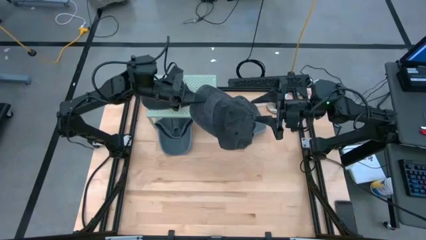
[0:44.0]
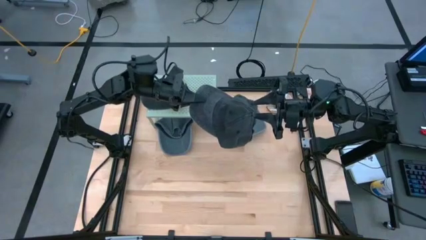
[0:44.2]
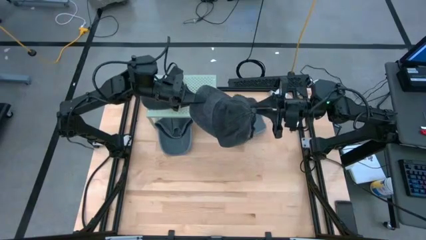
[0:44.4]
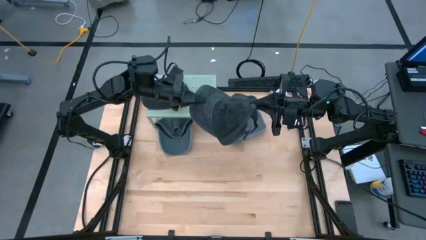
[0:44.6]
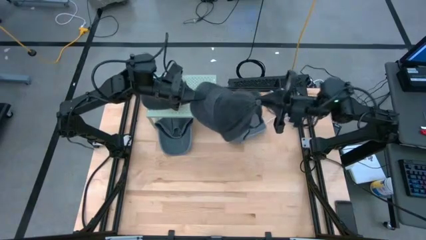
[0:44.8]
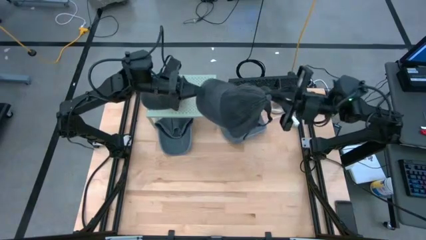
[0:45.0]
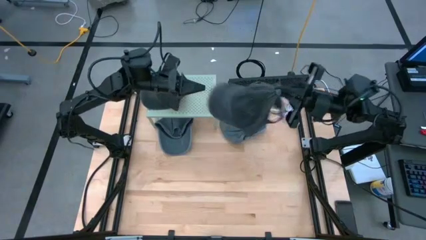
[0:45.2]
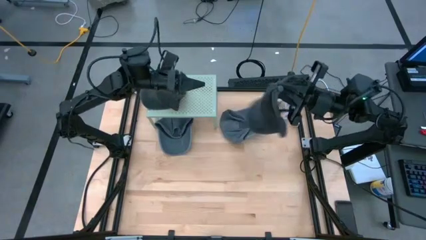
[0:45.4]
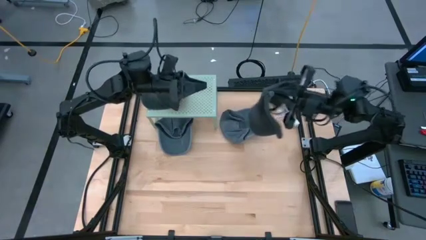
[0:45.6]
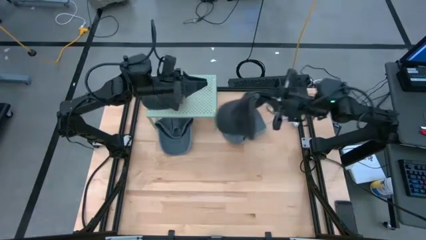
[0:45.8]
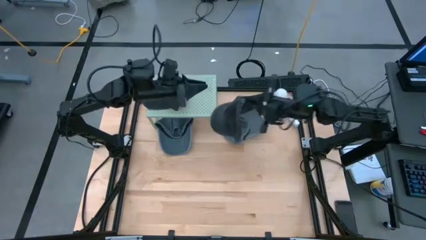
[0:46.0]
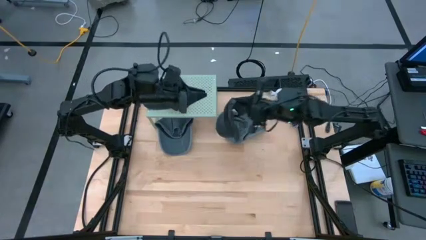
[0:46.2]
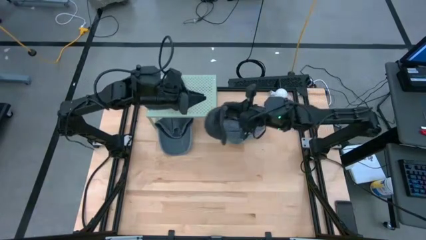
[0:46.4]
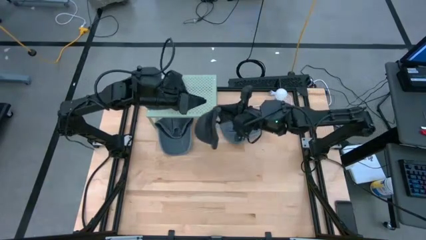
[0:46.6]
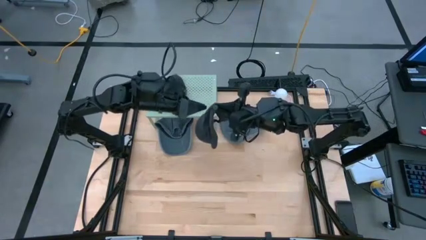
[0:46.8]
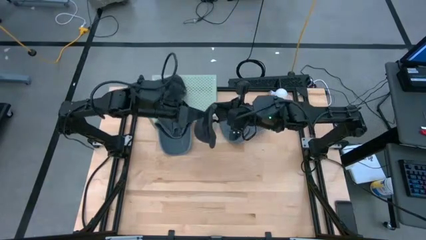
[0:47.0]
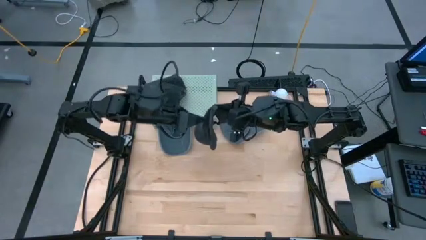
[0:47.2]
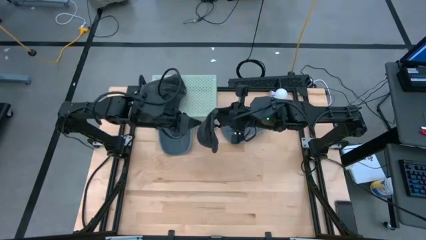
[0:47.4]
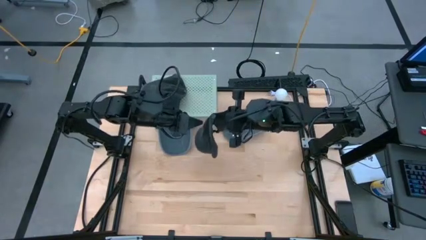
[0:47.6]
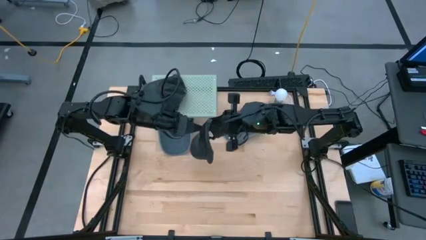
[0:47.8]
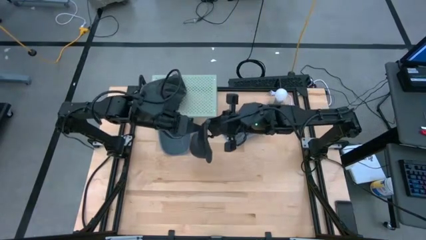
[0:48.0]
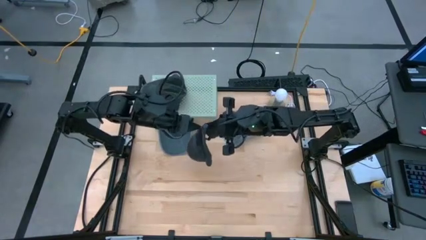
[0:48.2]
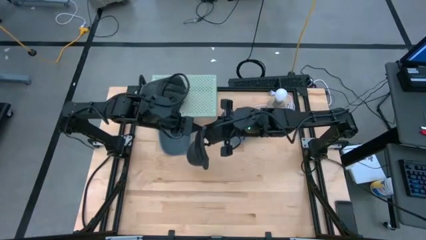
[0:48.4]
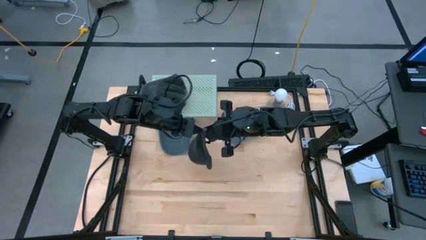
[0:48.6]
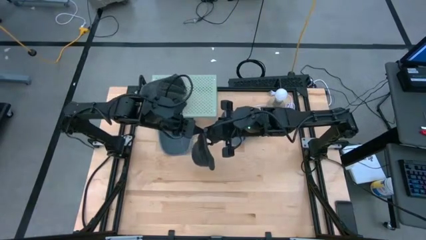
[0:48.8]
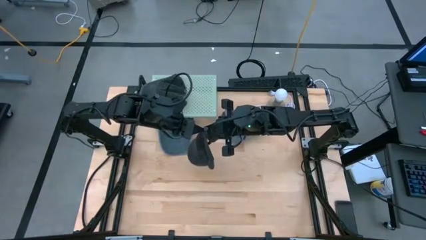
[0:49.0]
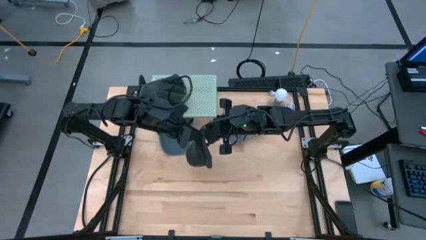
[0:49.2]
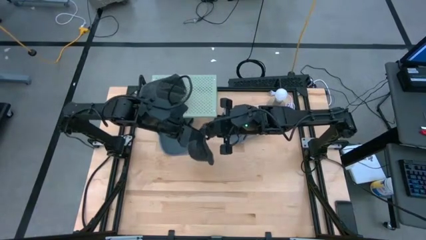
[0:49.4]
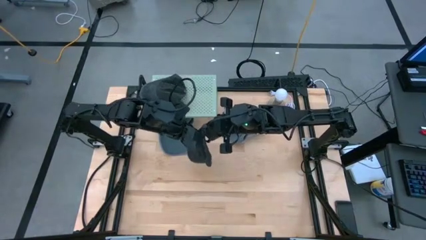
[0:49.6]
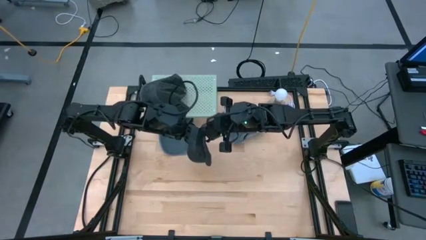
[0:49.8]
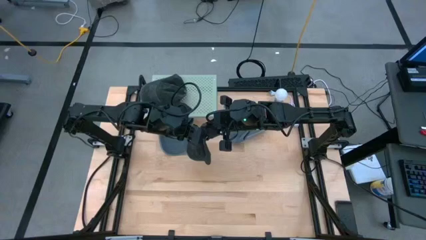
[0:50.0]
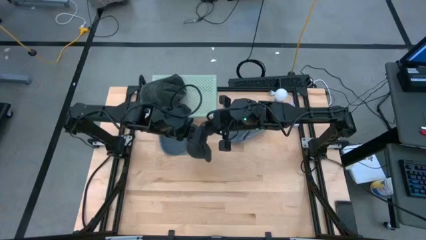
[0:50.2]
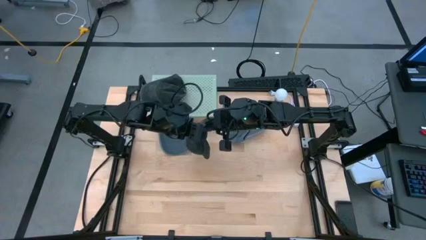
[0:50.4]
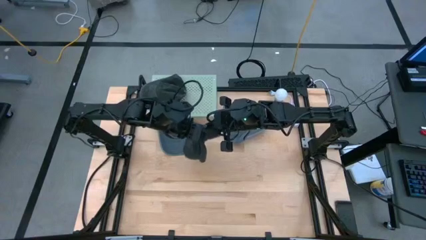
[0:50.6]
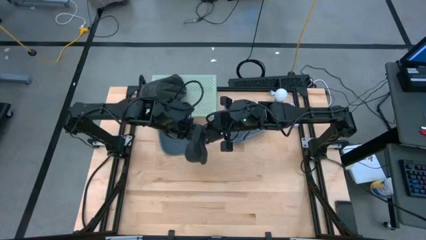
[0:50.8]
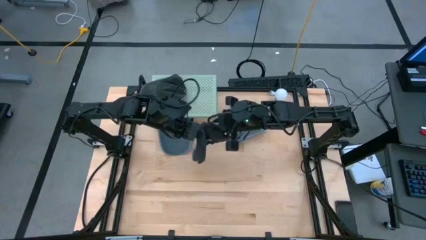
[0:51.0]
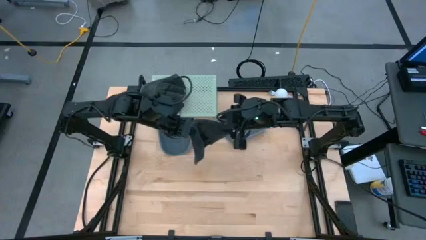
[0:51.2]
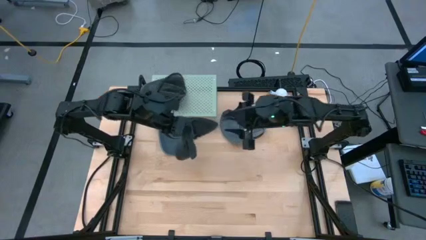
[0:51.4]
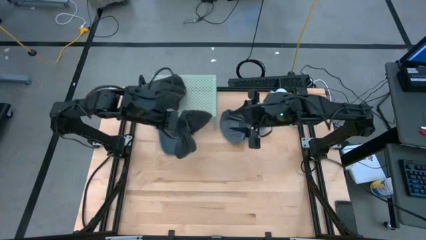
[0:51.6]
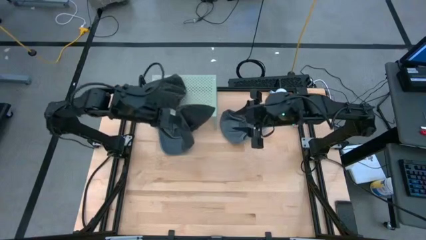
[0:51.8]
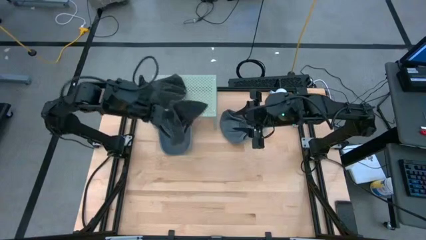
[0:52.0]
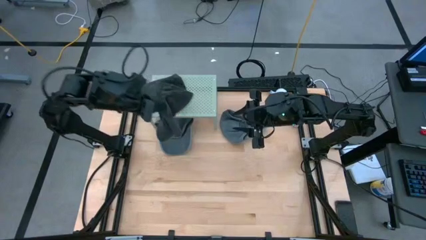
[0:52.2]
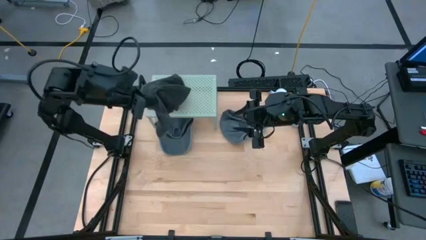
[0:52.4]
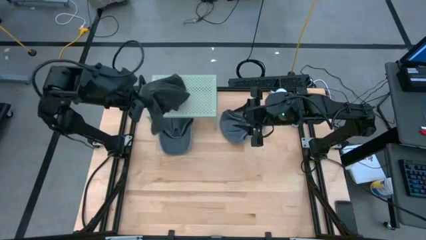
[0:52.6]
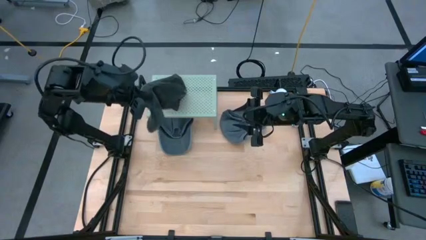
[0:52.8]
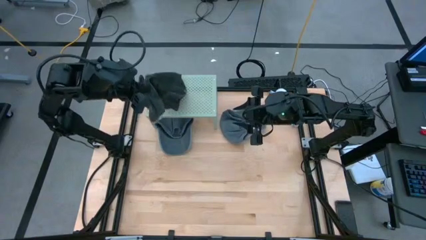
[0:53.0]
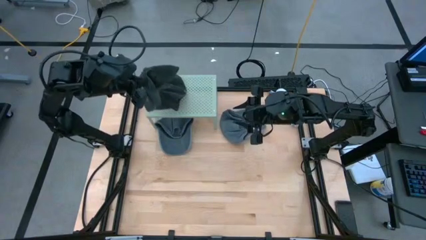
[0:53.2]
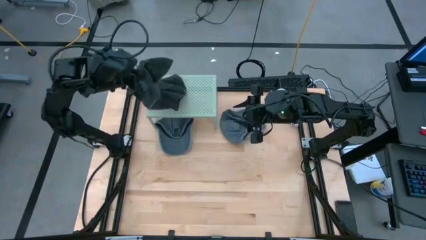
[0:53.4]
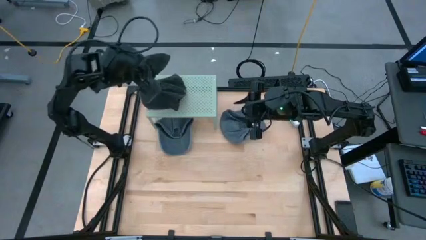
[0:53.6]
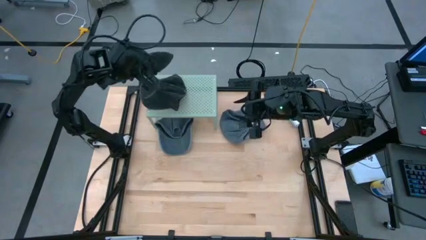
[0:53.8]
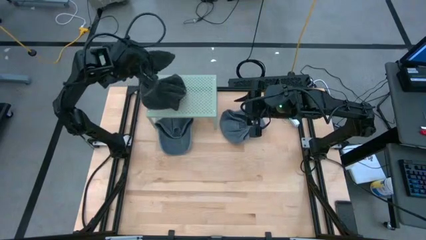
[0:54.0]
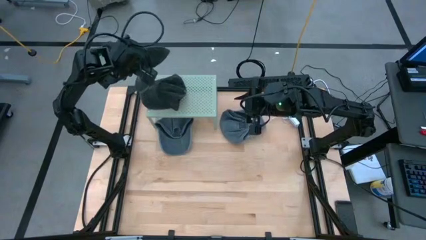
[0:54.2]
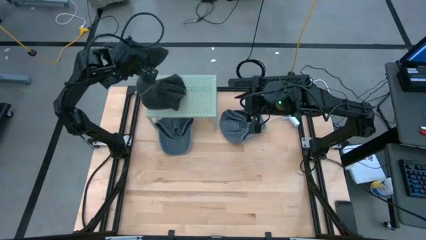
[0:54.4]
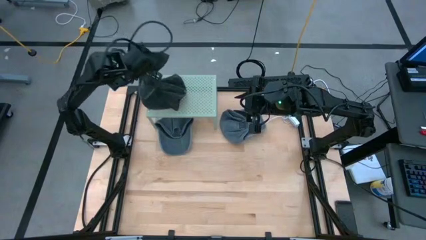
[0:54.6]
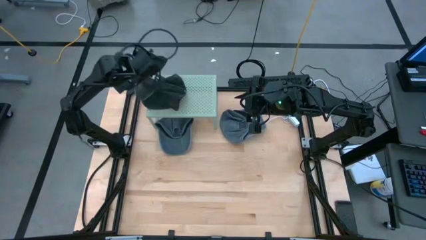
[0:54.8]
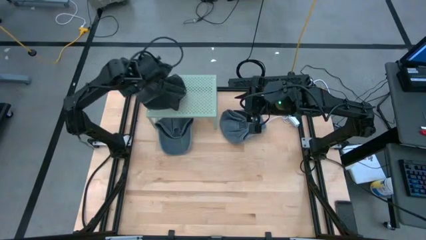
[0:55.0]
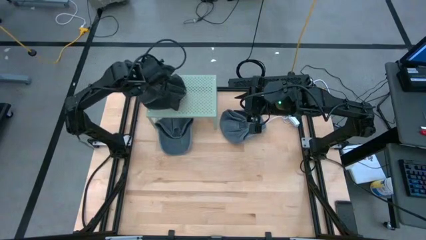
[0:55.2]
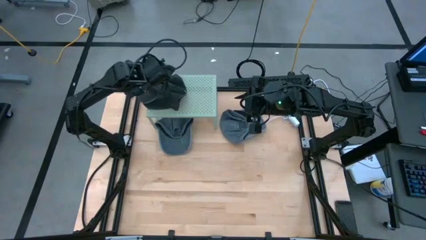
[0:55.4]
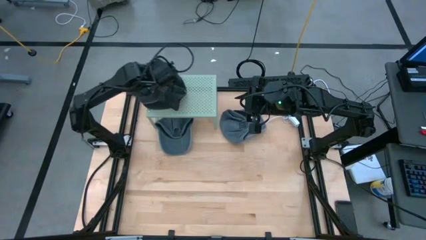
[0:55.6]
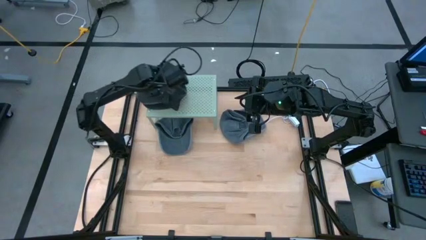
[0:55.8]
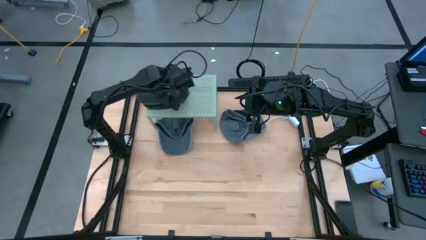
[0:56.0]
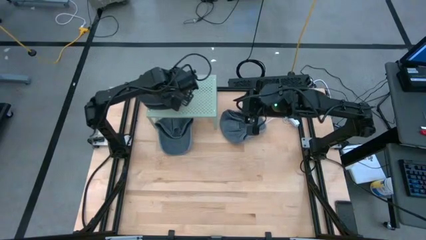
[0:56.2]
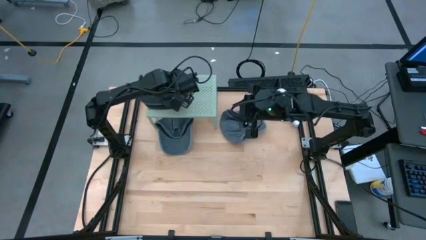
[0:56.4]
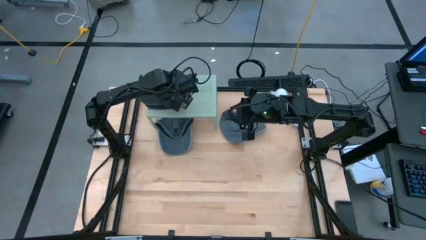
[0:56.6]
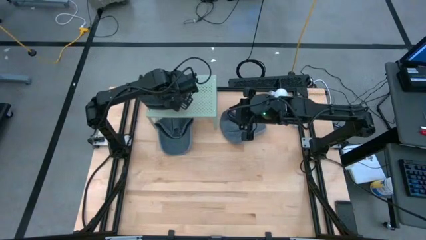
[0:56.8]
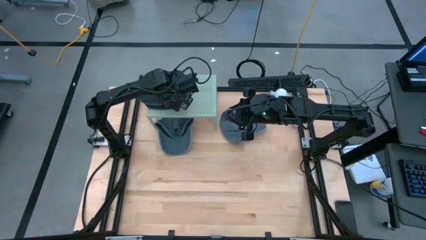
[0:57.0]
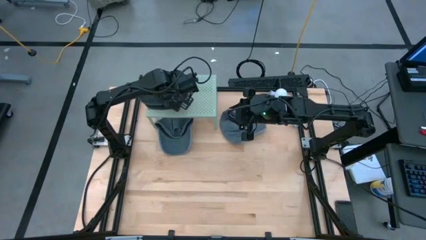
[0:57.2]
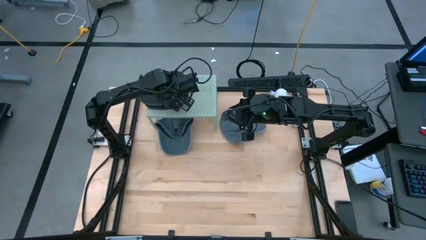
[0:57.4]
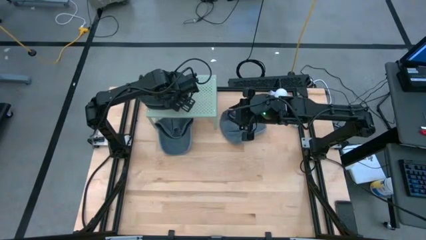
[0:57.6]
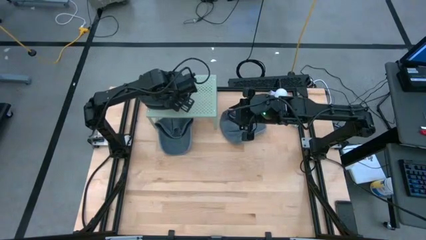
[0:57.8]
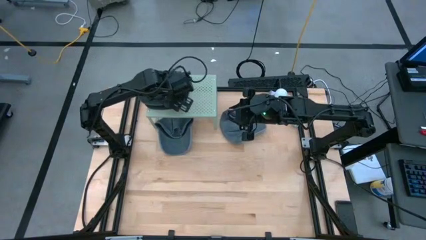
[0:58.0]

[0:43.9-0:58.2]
Task: Pick & Place hat
Stack the black cap on the black cap on the shelf

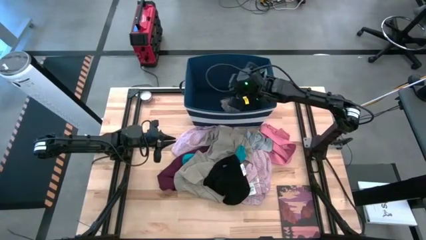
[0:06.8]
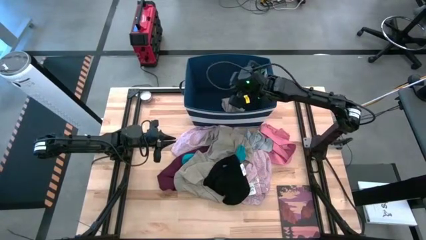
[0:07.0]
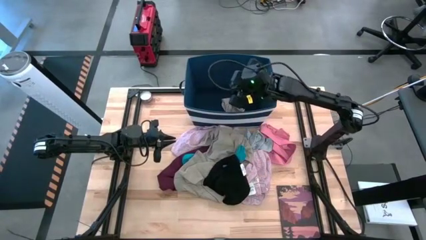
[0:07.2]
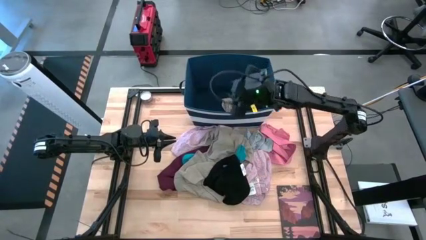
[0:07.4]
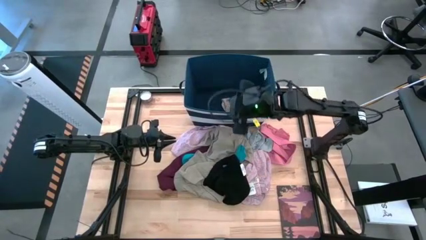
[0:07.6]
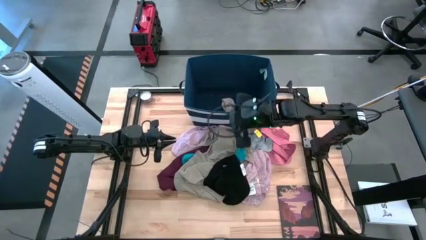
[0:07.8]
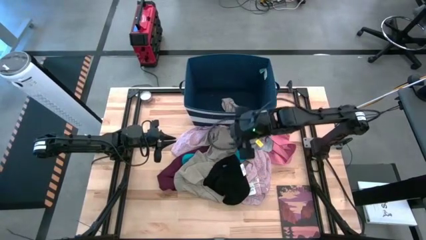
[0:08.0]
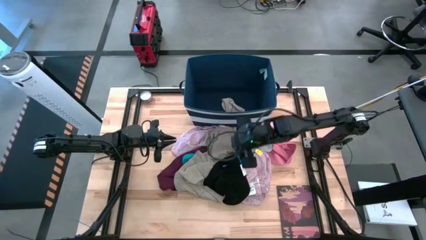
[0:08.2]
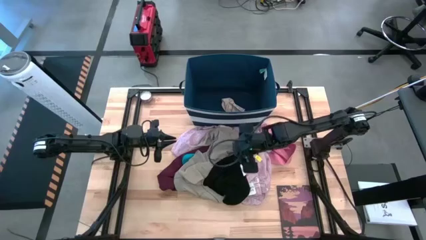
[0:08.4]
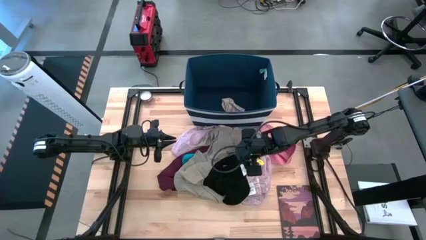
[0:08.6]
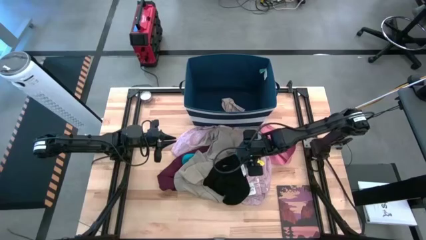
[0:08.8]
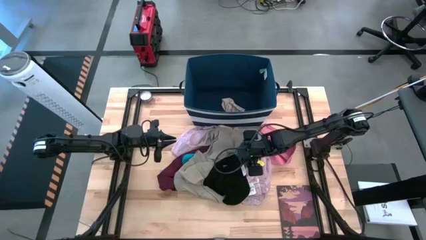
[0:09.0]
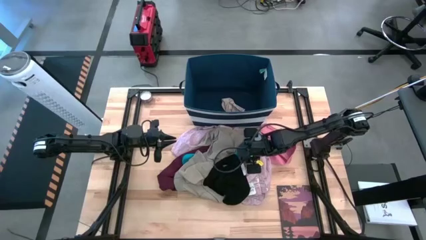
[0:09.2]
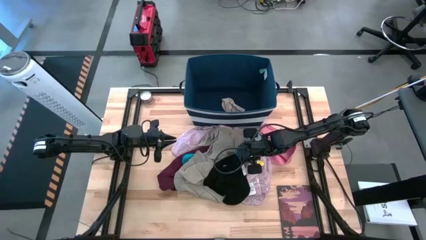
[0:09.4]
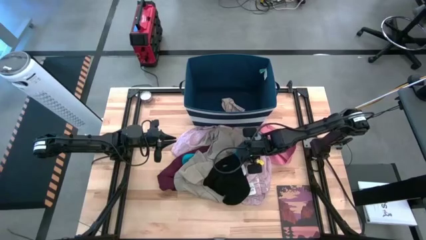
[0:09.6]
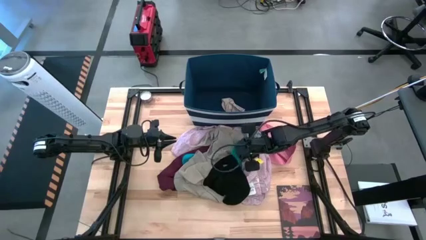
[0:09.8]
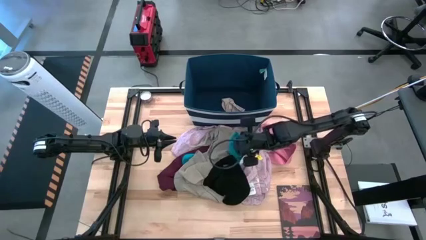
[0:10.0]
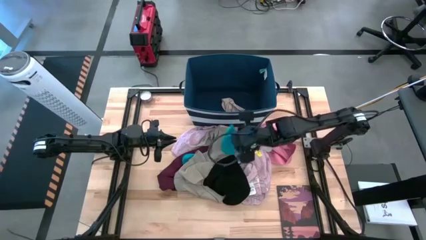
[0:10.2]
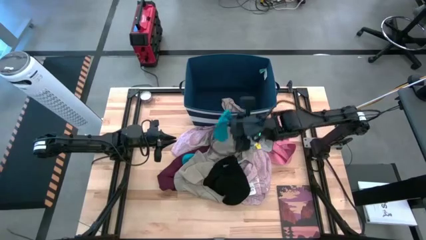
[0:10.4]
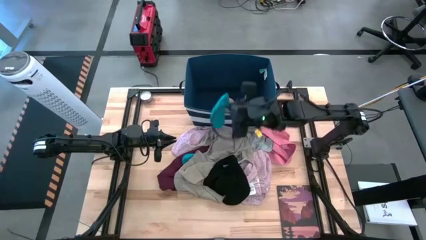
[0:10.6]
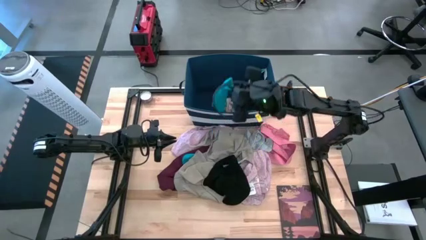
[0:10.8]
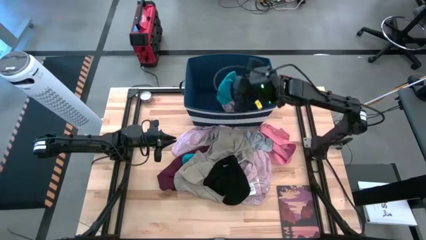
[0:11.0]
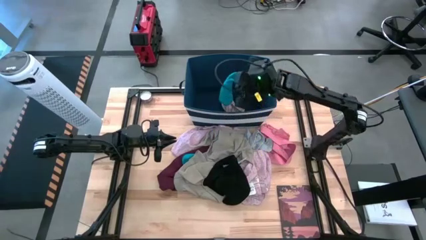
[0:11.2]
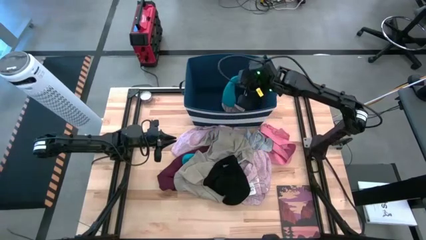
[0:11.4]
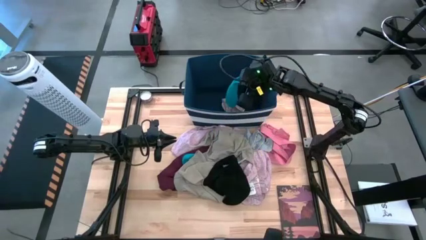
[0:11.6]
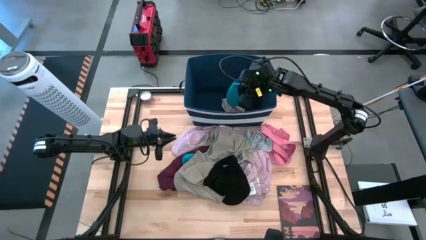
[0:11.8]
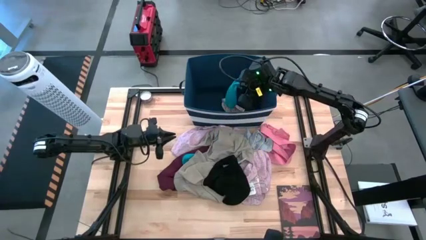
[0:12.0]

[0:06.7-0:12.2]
Task: Sort clothes
Put the right blue sock into the blue laundry organizer
